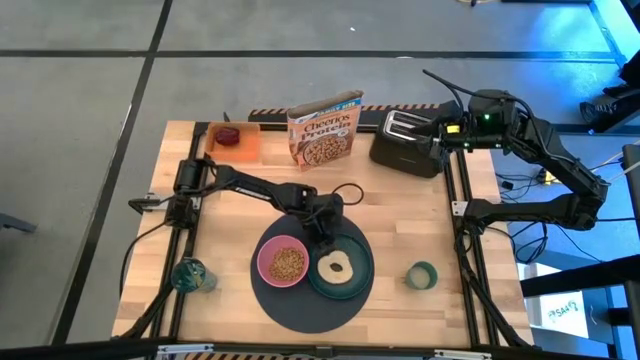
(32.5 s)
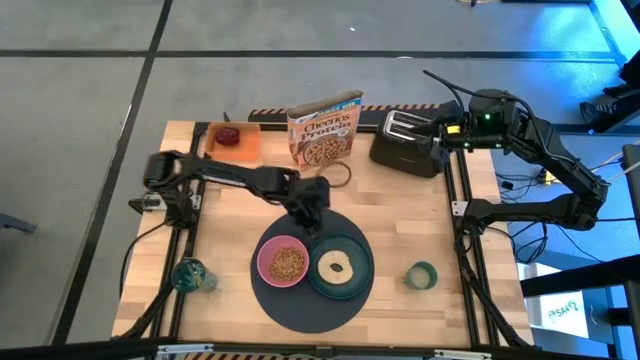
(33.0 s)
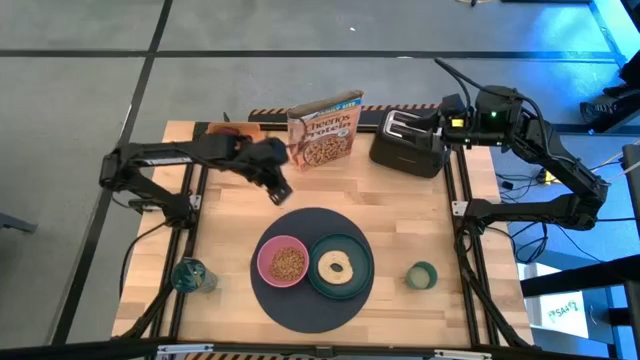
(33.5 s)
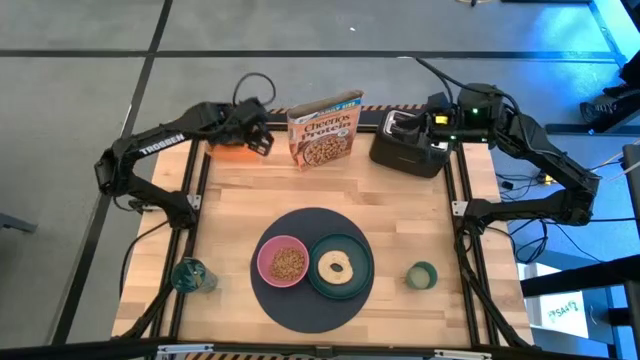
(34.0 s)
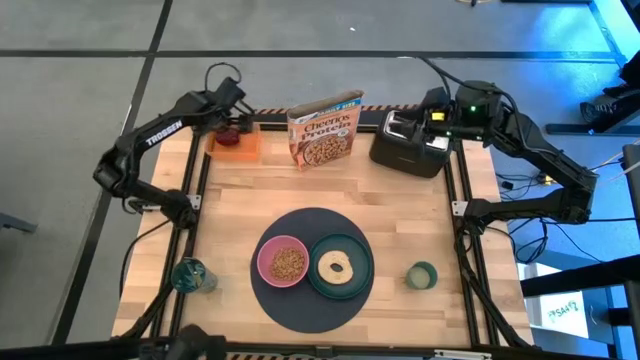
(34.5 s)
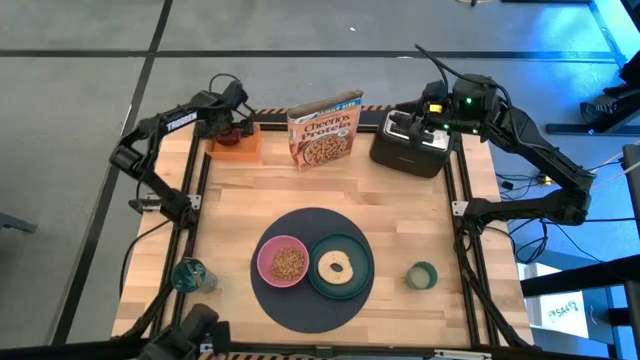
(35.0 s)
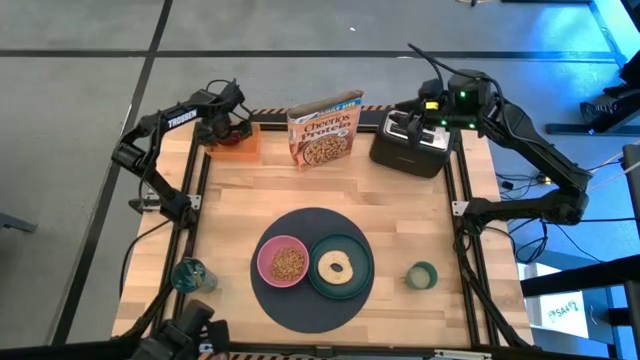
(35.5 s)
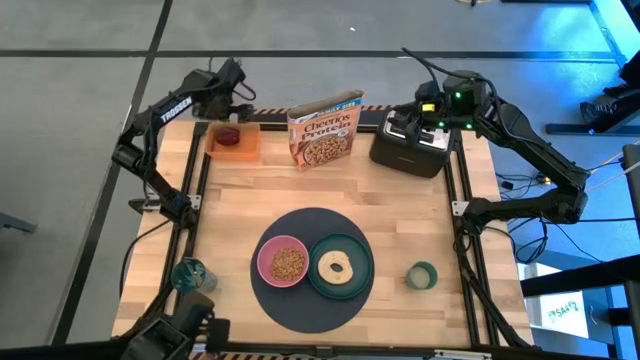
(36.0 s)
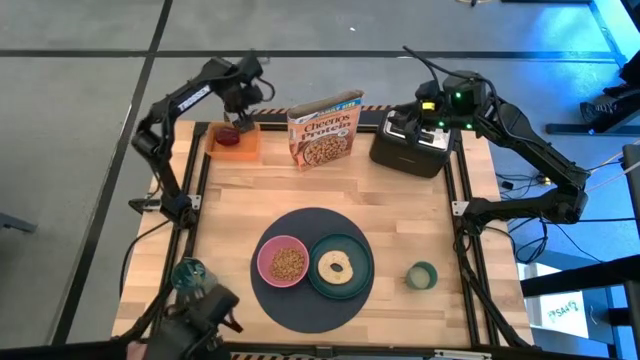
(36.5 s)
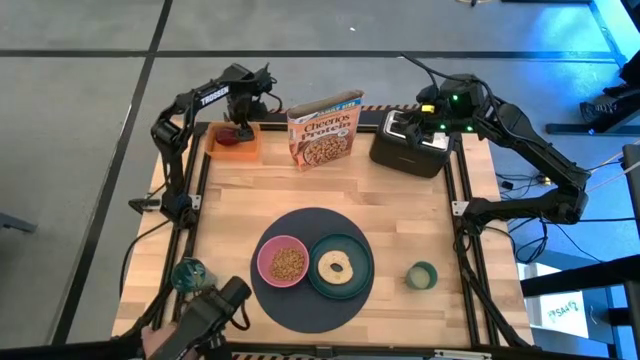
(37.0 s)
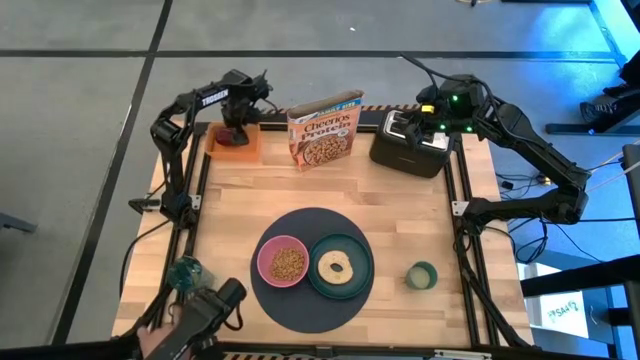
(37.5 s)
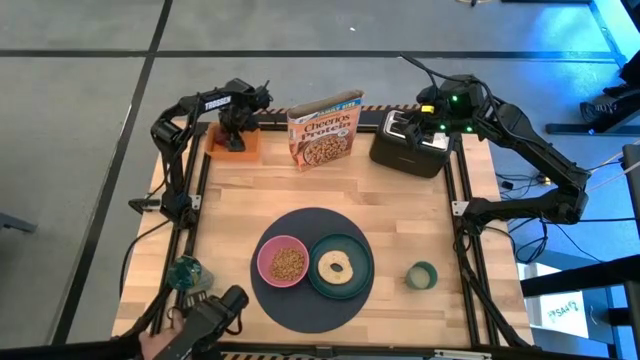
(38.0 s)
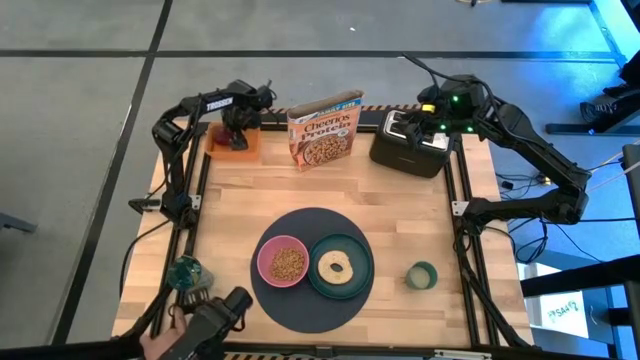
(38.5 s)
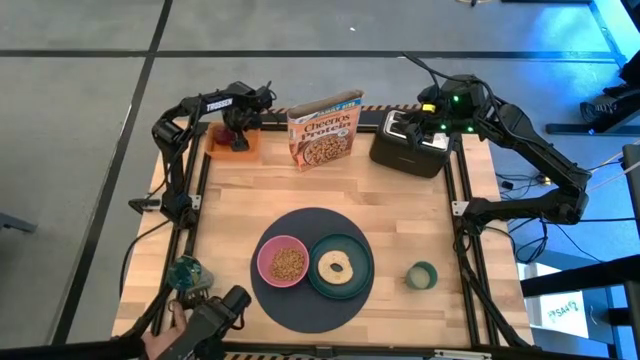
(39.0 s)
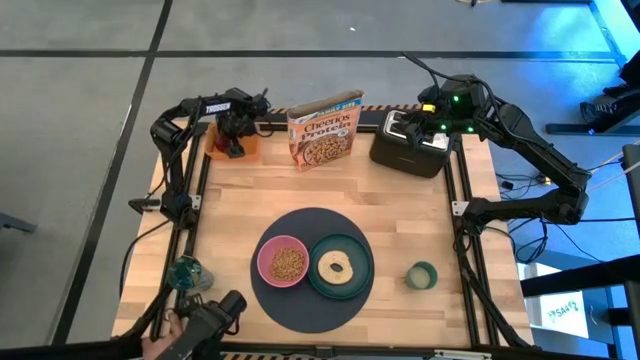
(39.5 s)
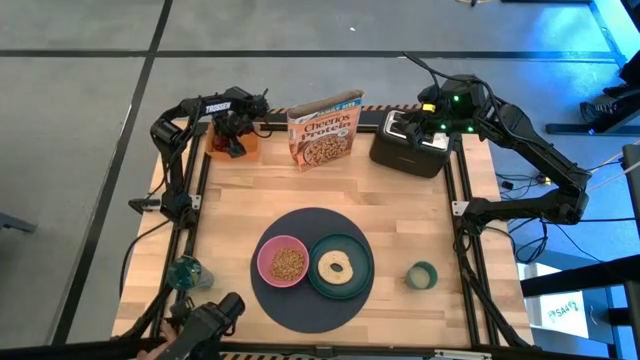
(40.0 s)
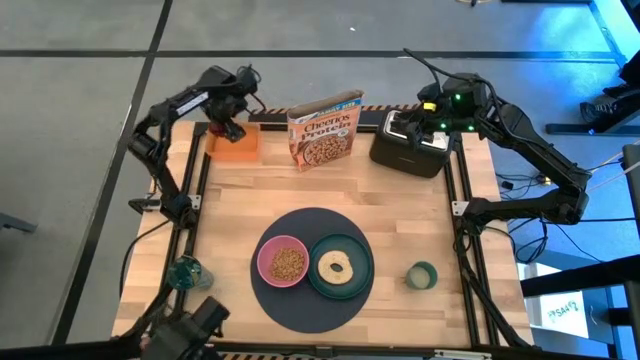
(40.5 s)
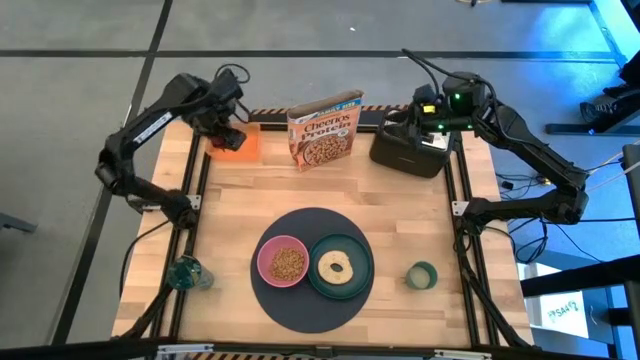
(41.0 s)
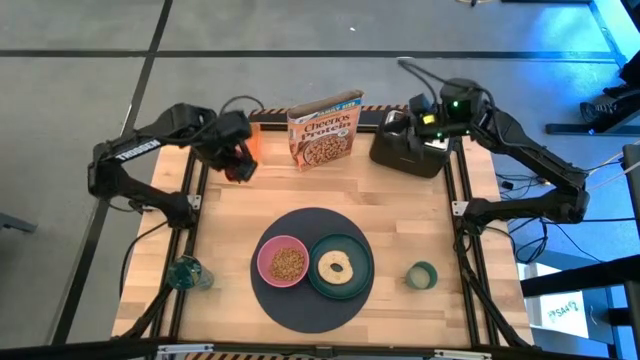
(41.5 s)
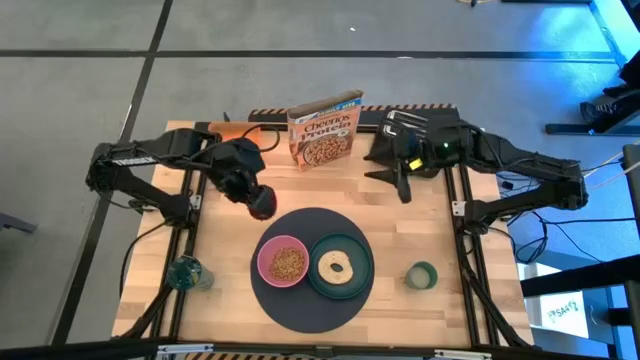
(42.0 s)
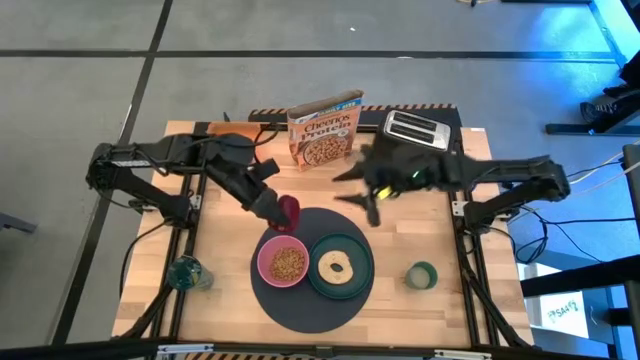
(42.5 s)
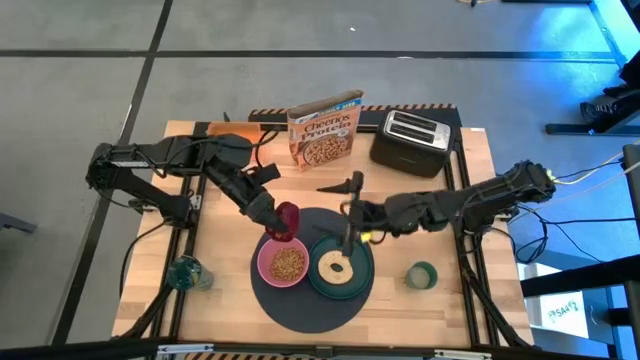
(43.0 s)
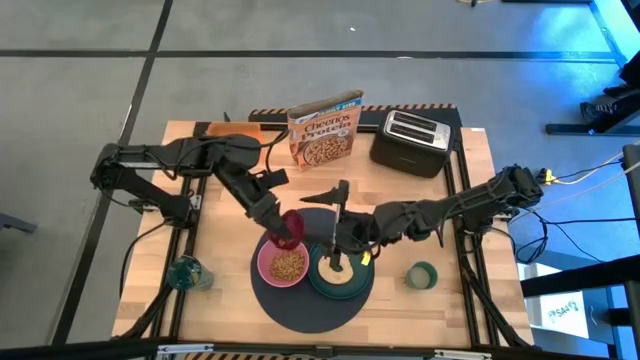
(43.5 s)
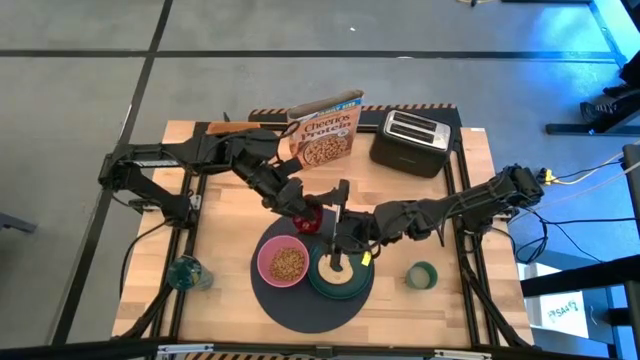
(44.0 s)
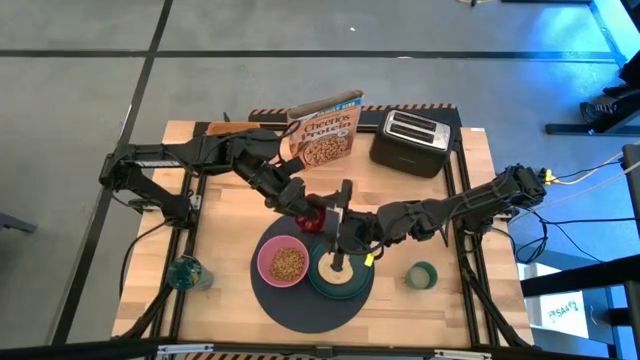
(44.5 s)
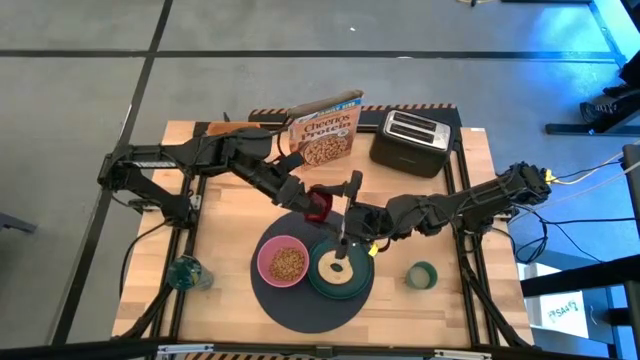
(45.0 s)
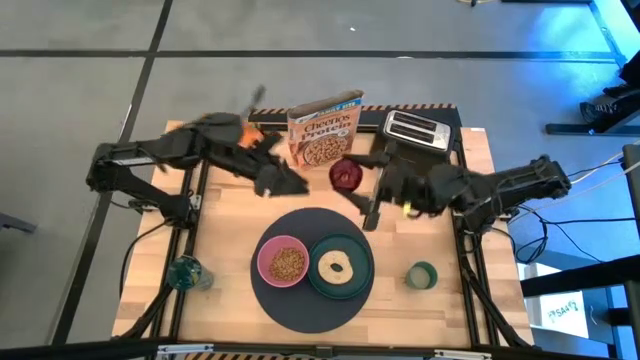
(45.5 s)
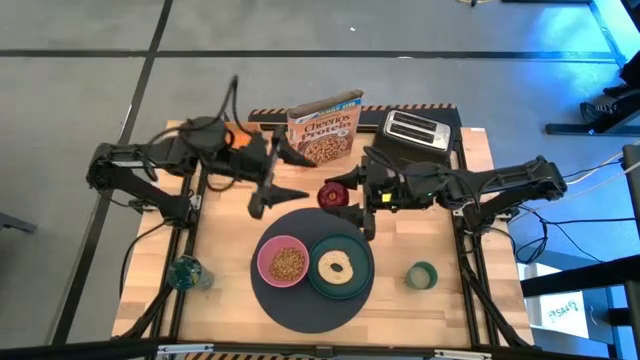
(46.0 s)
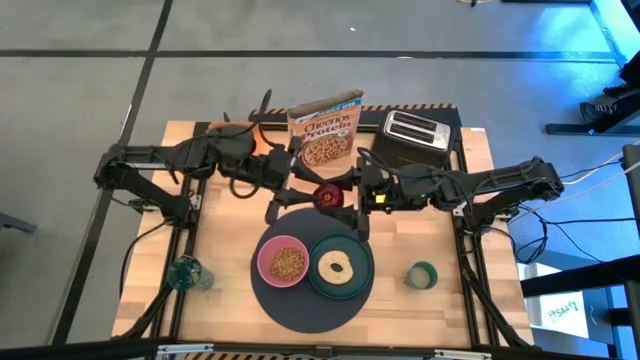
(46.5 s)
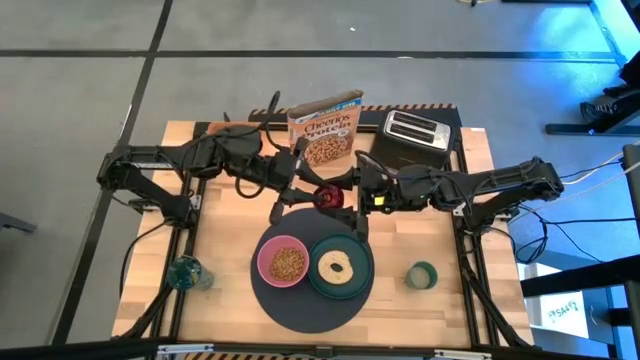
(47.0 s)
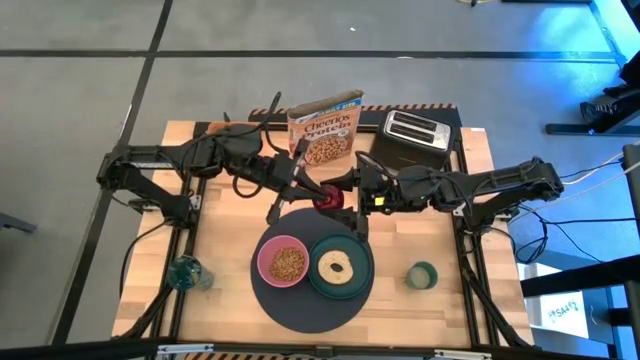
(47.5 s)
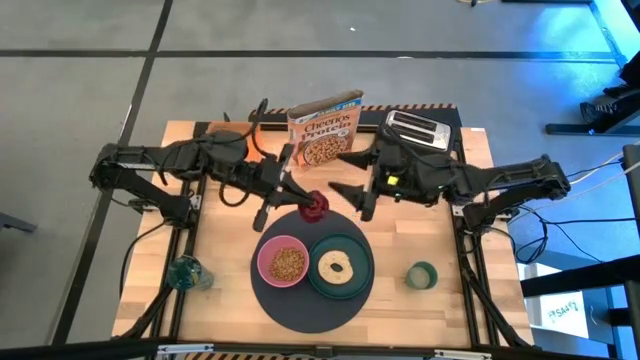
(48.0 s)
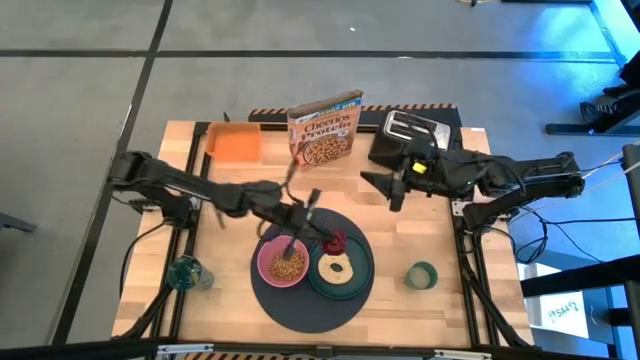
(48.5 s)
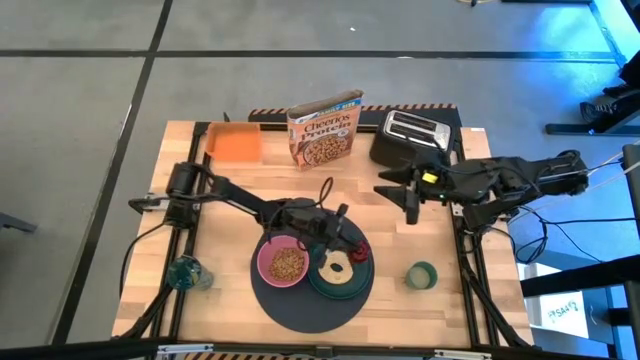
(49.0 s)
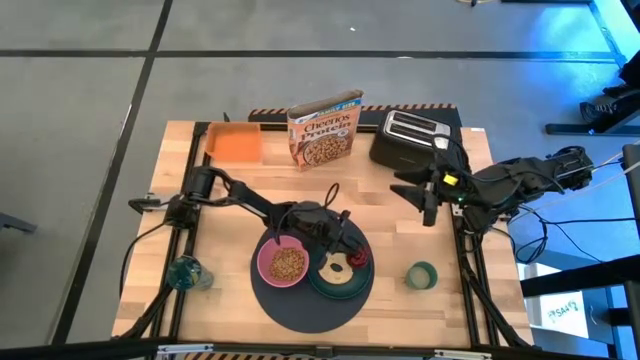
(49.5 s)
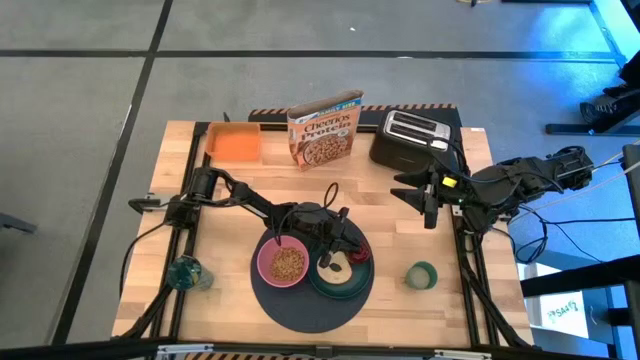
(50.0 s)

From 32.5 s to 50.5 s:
Task: Arrange a breakfast setting
Put the apple on the green plate

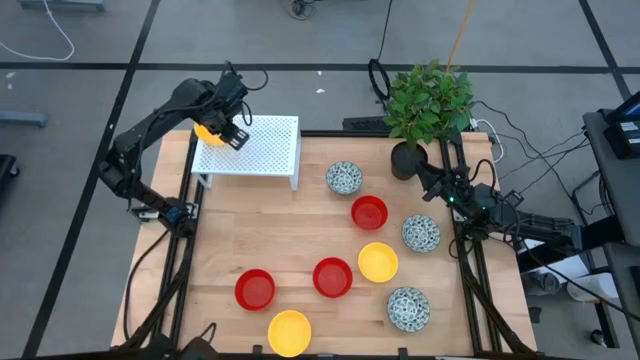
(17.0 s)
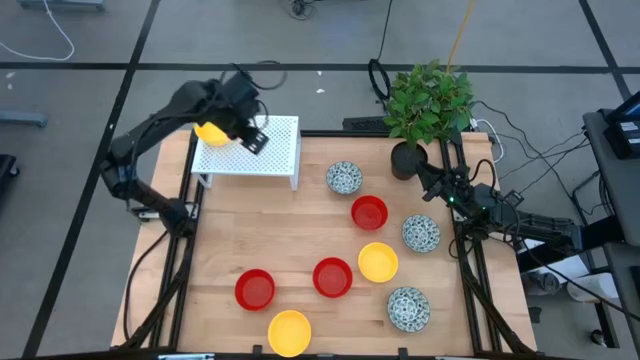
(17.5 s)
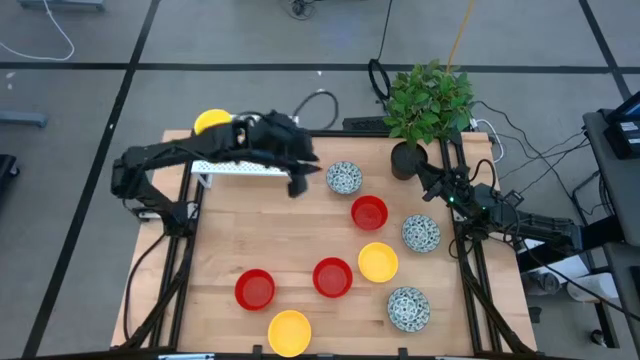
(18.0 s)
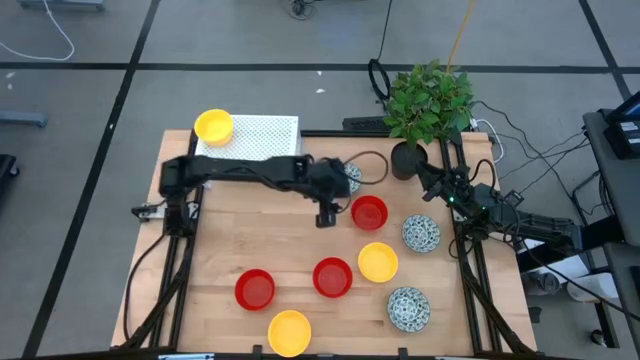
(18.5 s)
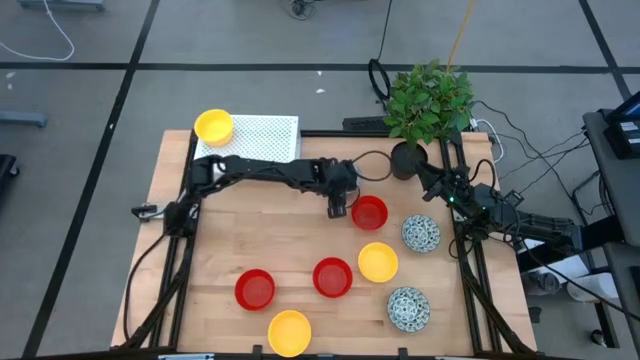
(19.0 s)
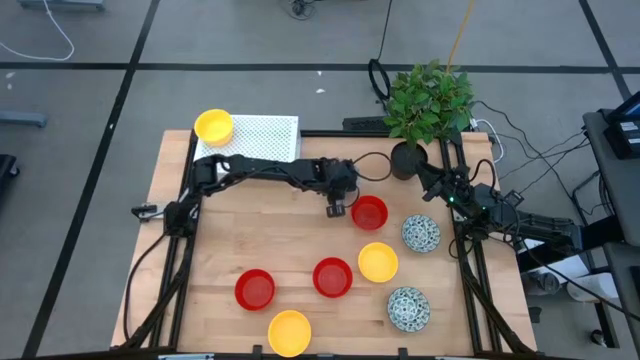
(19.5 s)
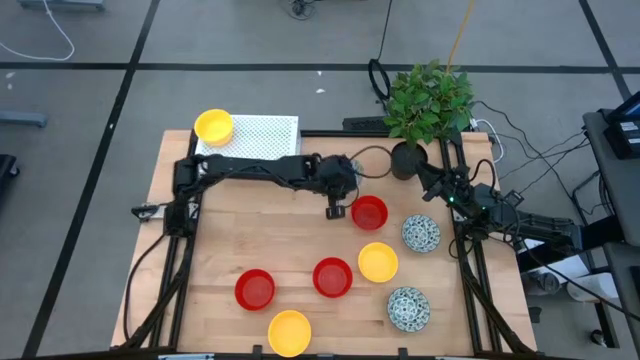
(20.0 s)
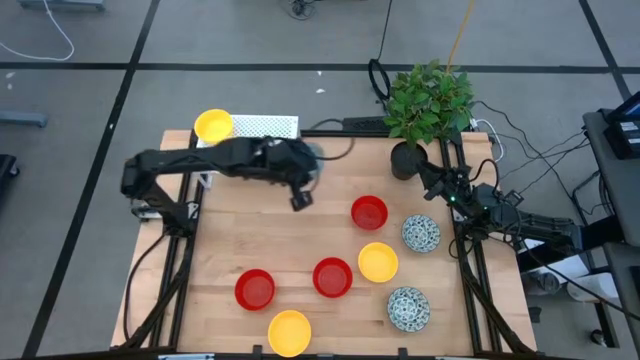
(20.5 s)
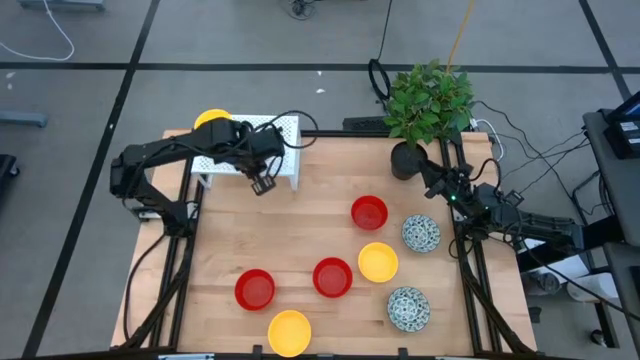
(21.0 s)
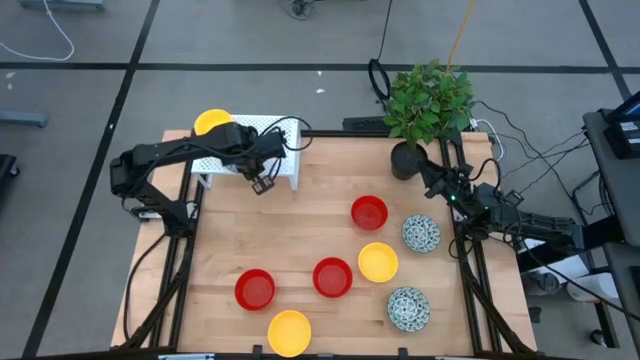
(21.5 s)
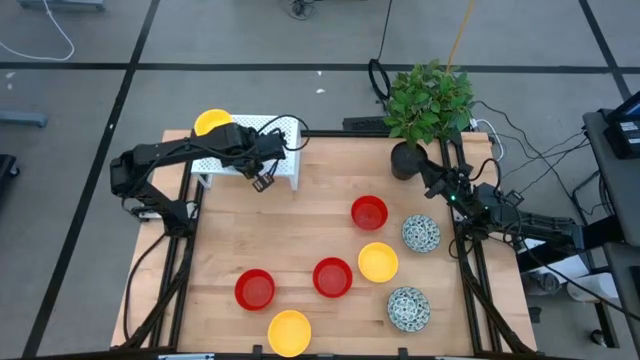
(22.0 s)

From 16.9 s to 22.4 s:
Task: Pick & Place Mini bowls
Put the white patterned bowl on the shelf
